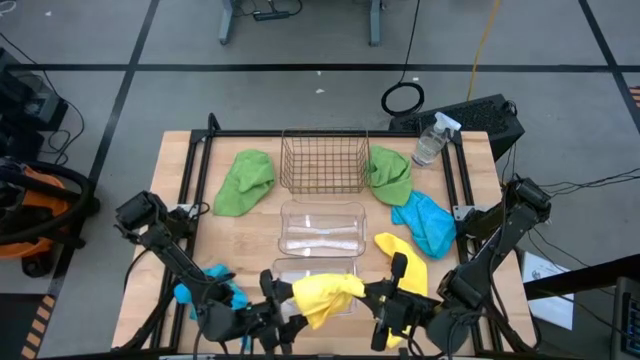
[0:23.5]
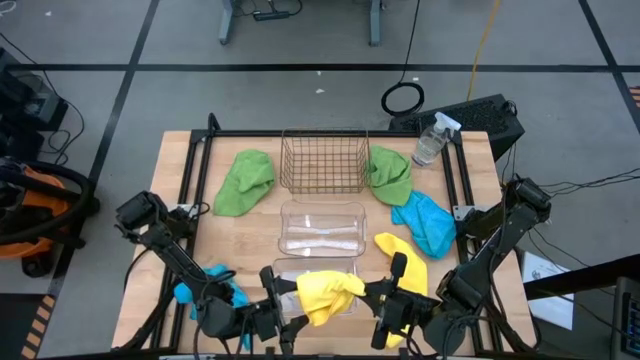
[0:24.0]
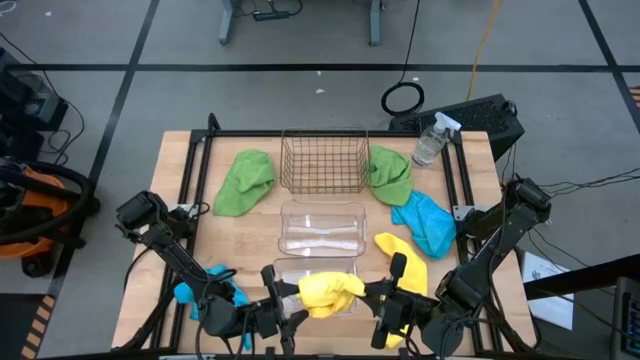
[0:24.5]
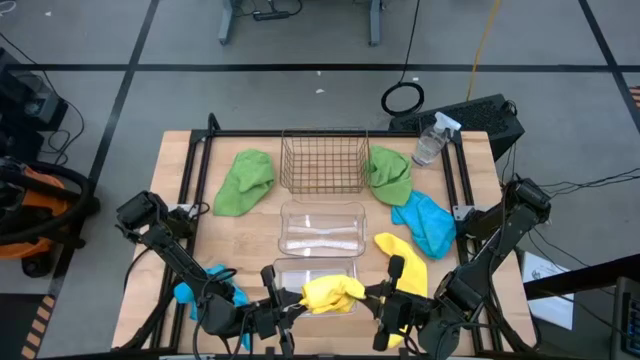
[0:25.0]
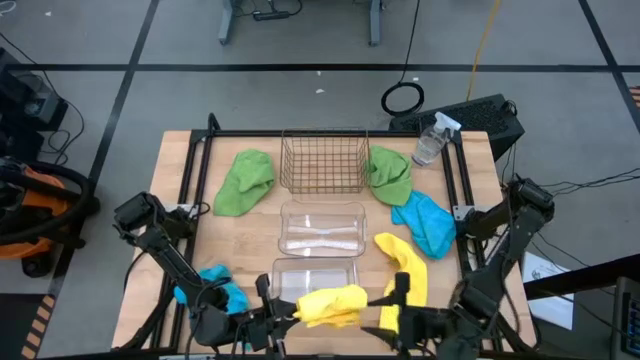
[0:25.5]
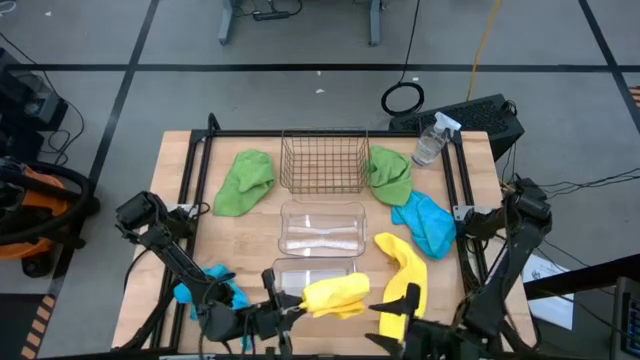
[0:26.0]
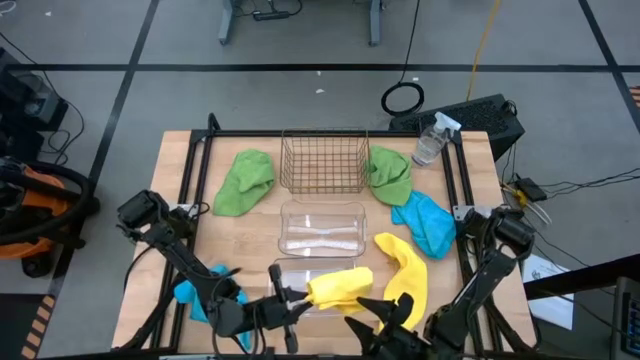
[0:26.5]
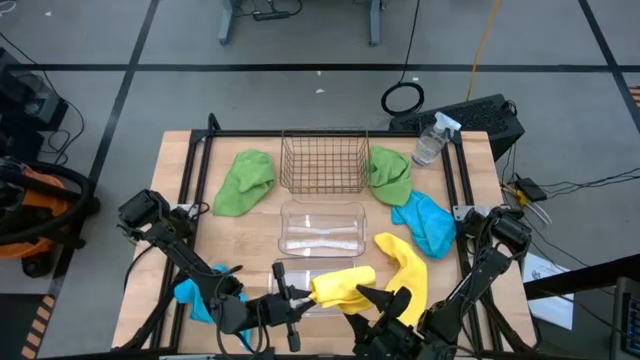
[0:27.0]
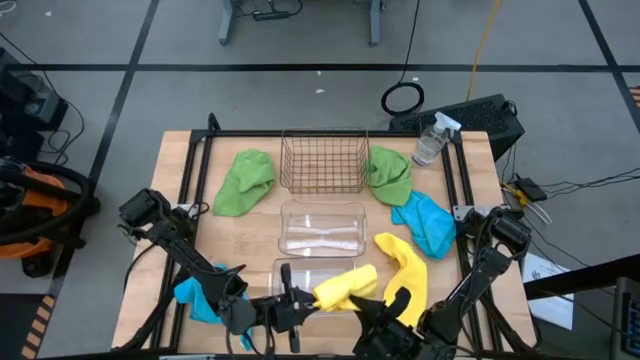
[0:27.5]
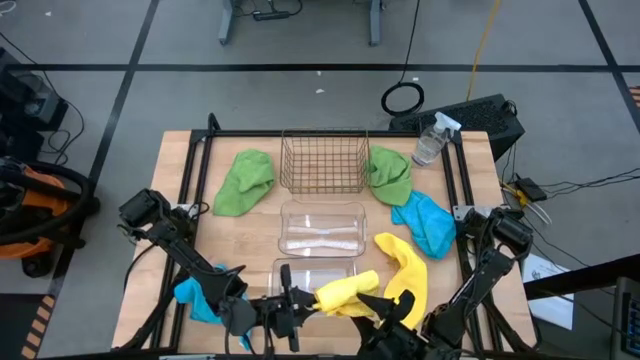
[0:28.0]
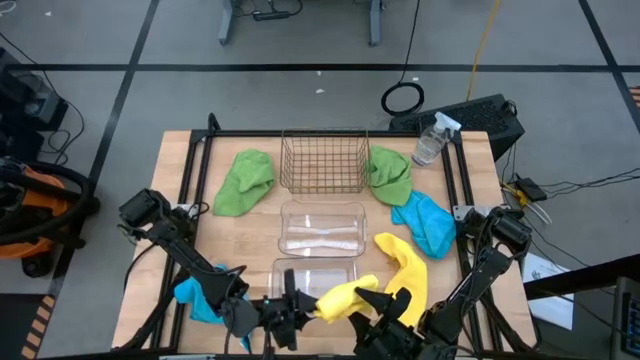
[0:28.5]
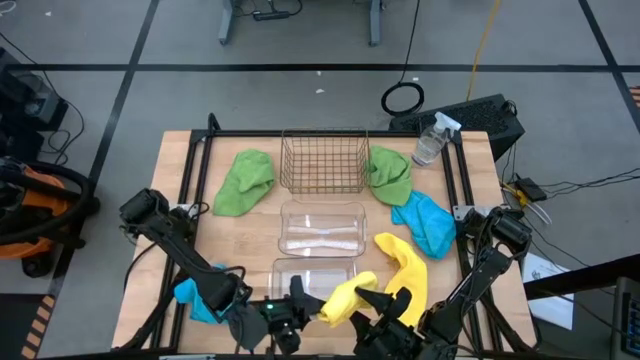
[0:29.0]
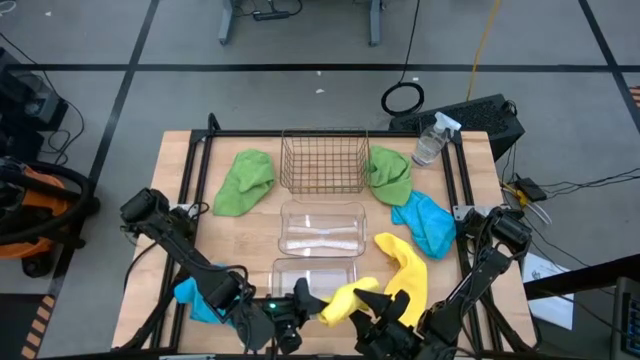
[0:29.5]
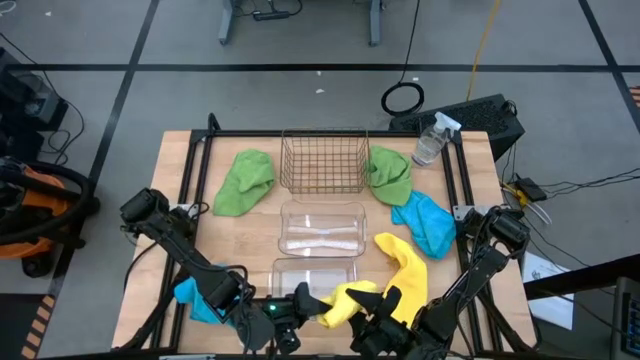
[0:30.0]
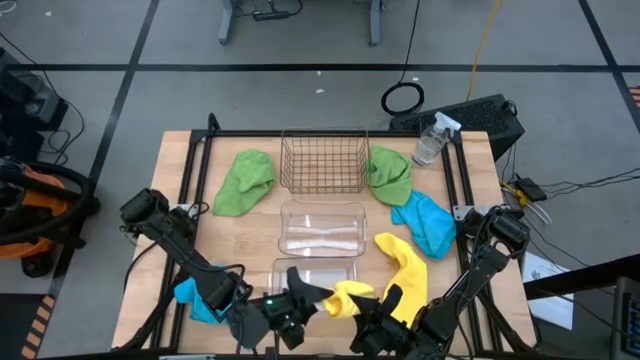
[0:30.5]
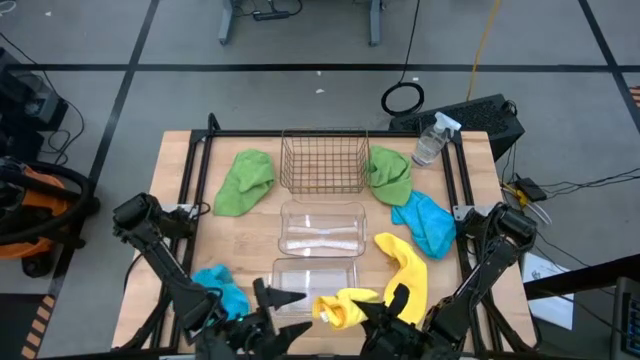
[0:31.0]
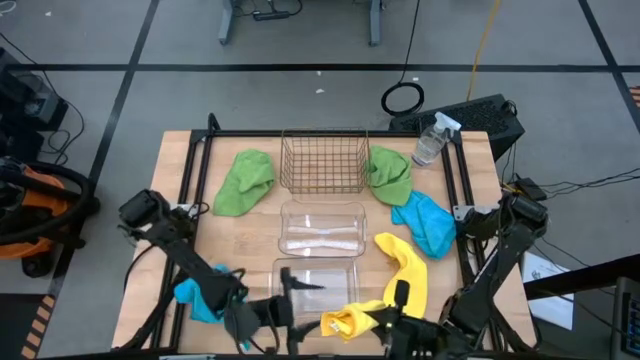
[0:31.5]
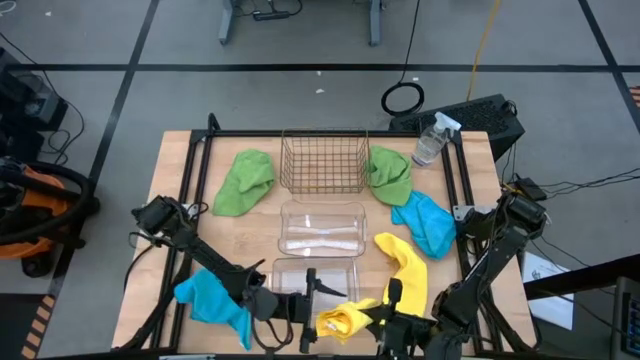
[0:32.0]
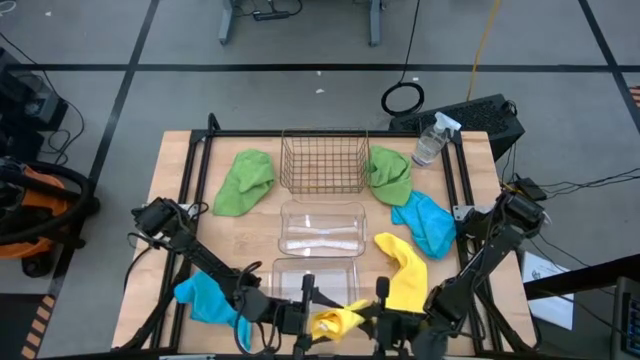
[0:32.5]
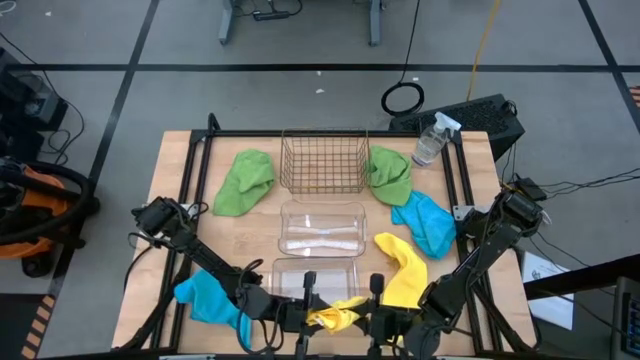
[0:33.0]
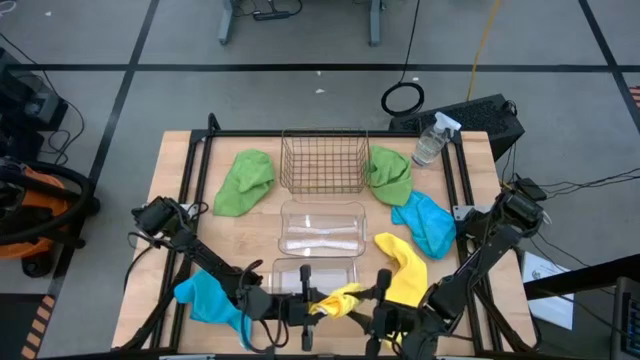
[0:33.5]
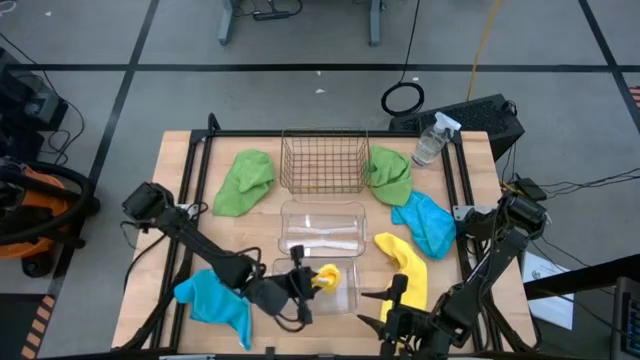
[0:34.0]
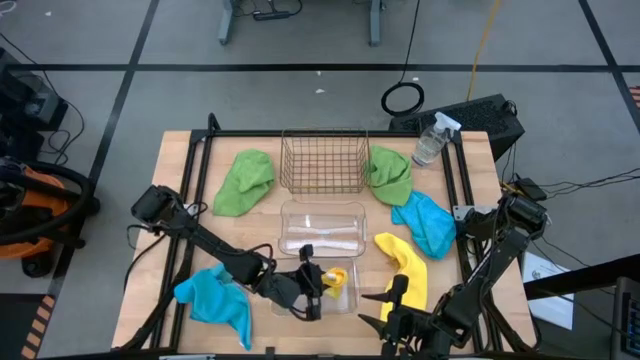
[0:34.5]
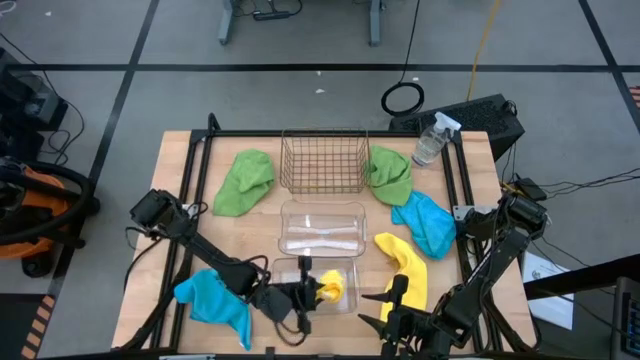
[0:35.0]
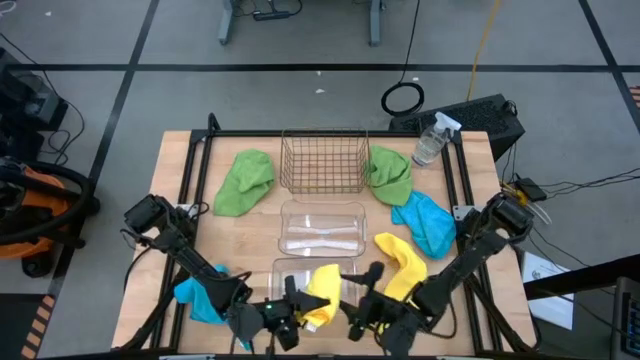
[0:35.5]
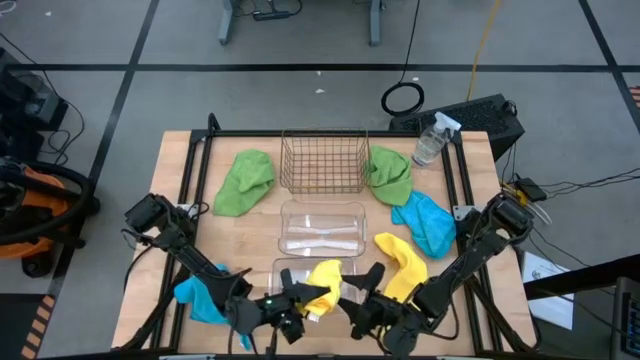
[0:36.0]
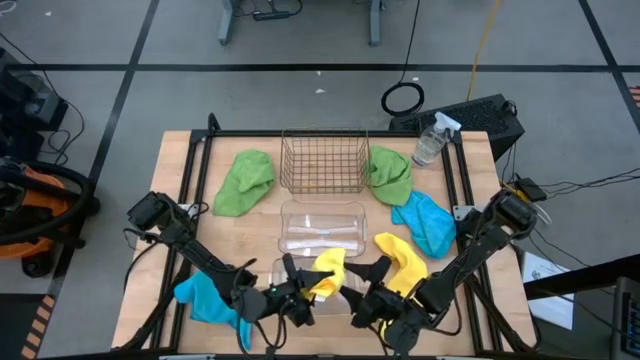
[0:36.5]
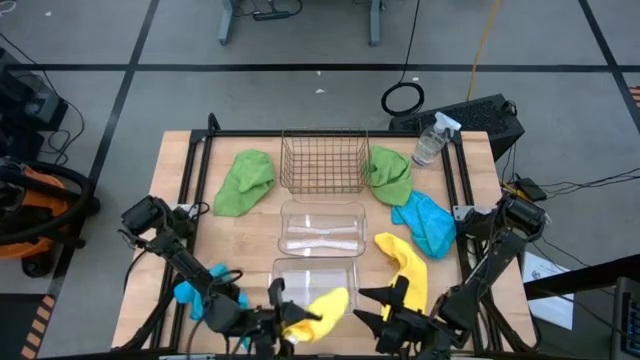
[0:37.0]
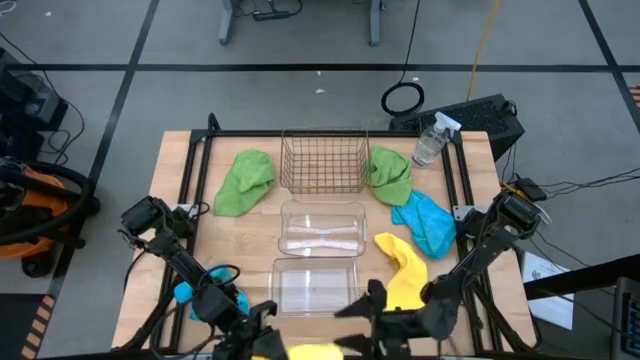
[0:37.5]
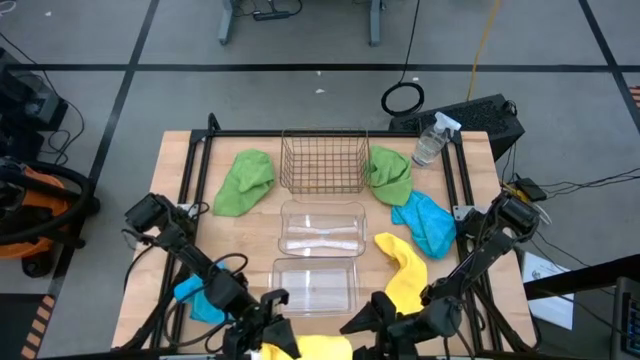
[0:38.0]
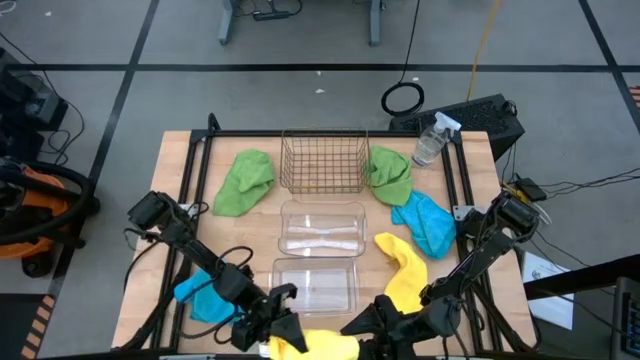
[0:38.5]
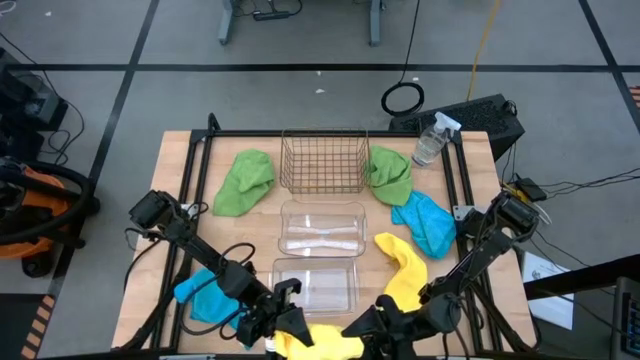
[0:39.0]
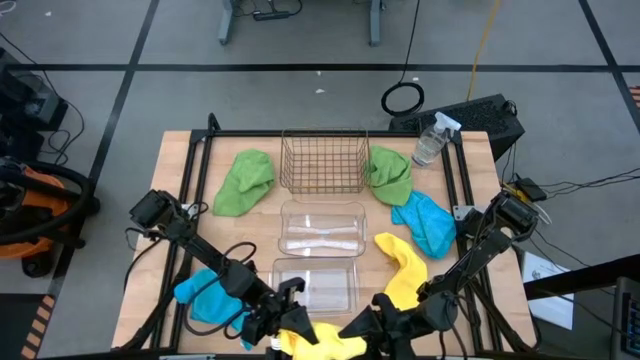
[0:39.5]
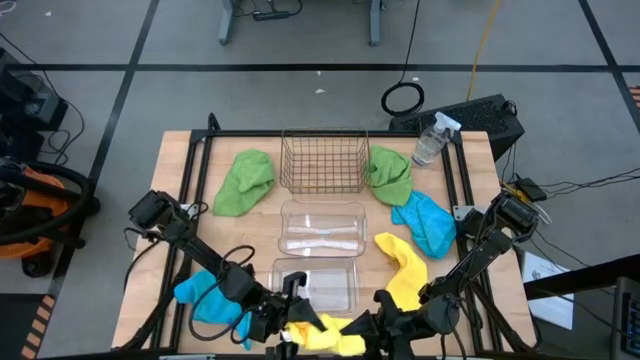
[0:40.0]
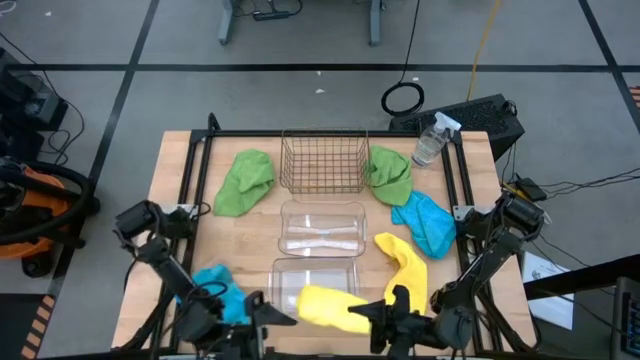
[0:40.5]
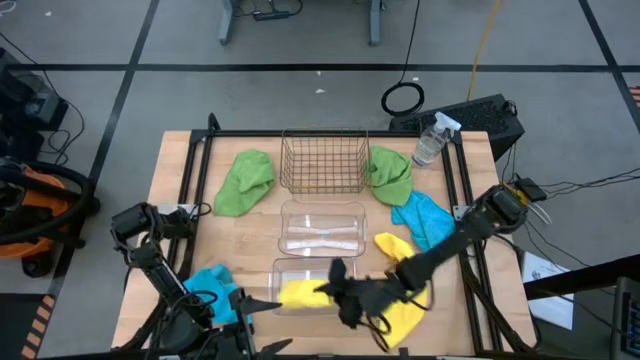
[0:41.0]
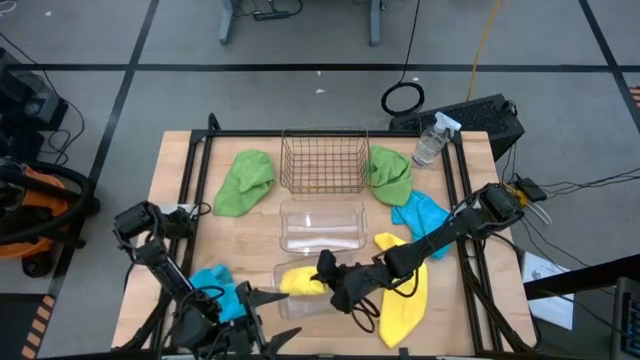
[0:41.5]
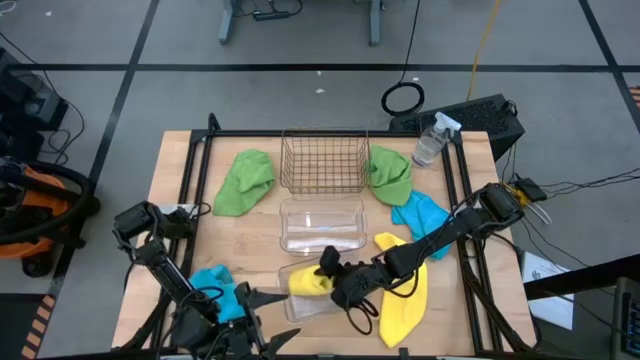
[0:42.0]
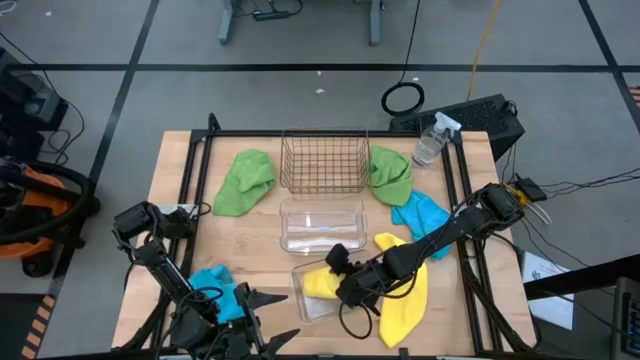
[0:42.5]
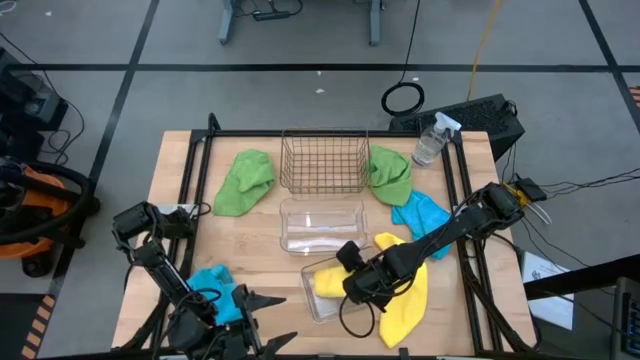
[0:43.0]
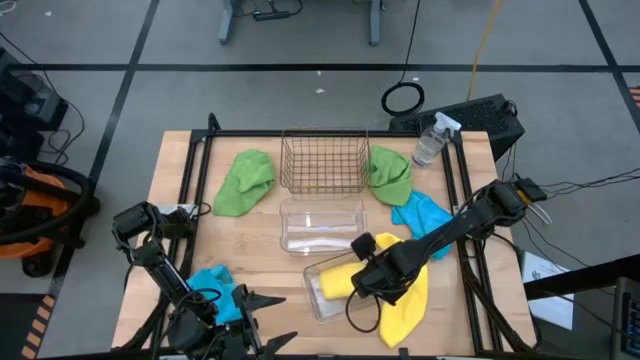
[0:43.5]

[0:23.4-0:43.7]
Task: Sort microfiber towel by color & place in baskets
Put the left yellow towel into the bottom transparent bin

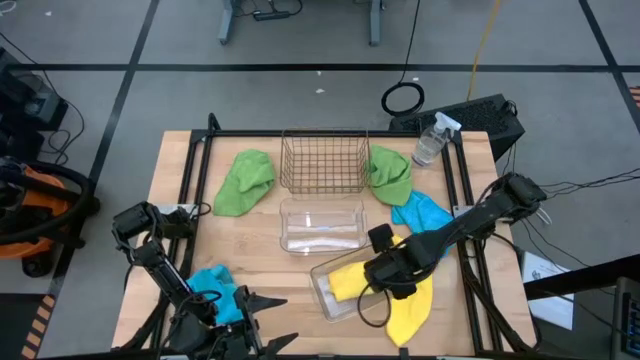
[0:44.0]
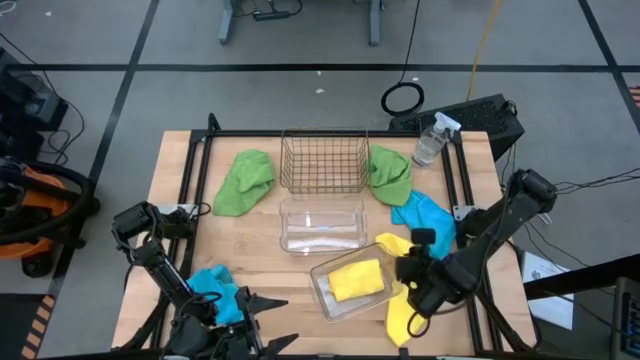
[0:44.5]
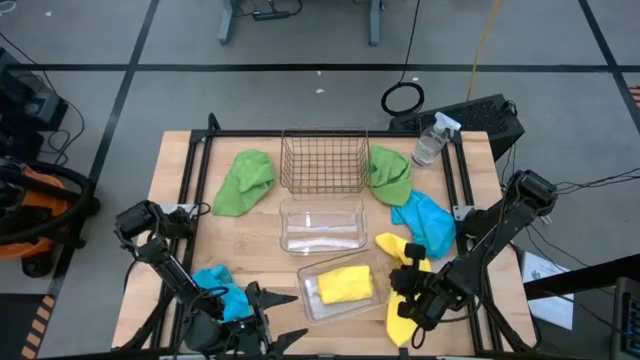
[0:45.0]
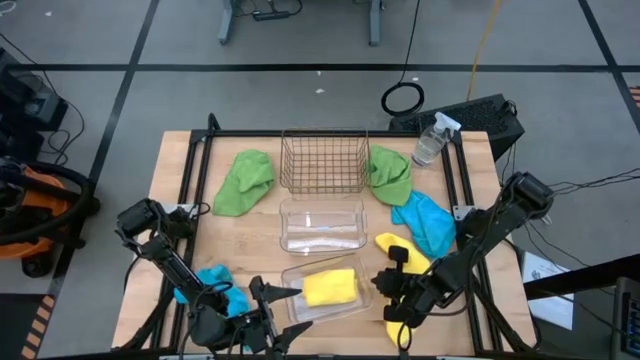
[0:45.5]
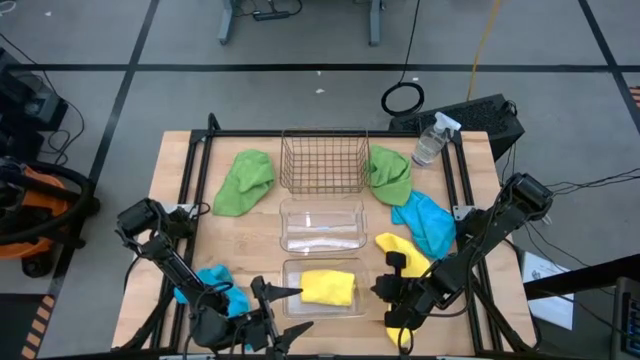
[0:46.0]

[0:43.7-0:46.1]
Adjust the bottom transparent bin
